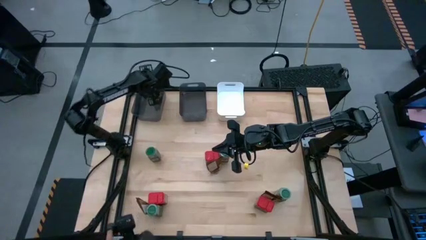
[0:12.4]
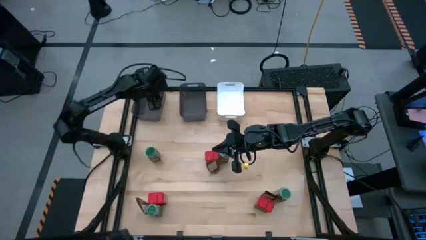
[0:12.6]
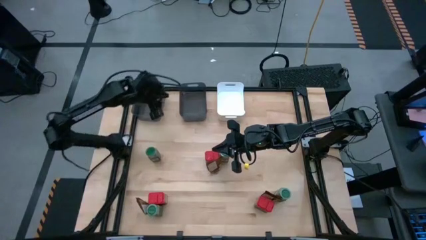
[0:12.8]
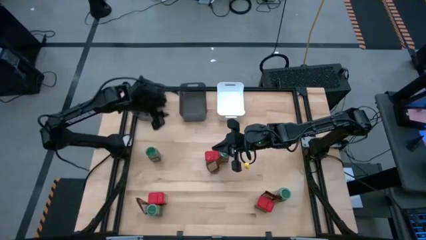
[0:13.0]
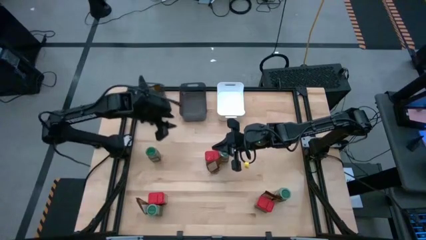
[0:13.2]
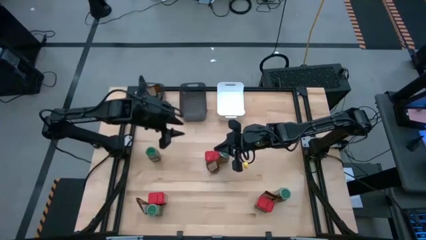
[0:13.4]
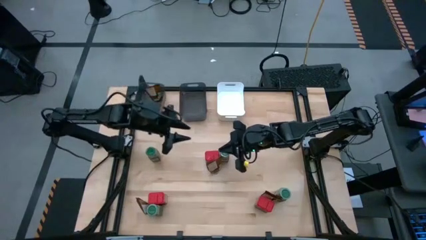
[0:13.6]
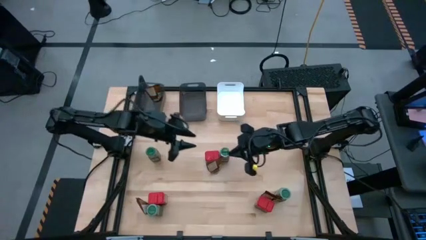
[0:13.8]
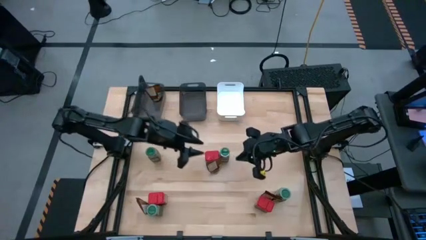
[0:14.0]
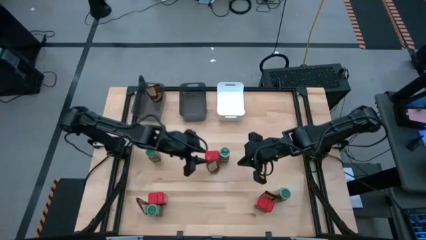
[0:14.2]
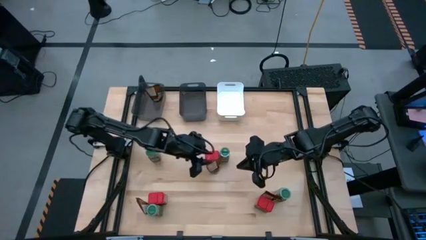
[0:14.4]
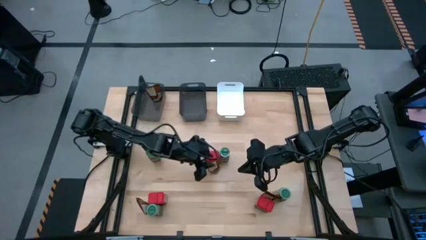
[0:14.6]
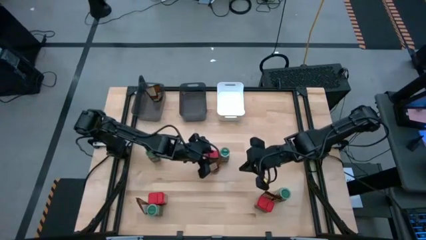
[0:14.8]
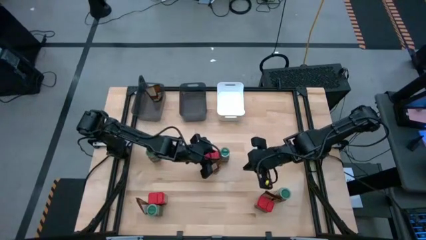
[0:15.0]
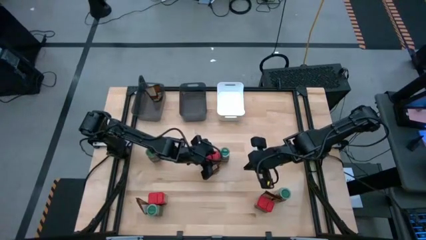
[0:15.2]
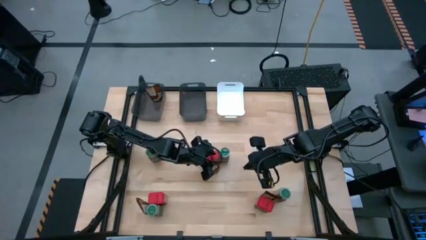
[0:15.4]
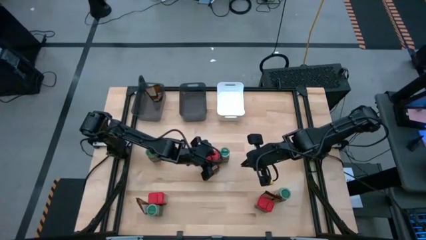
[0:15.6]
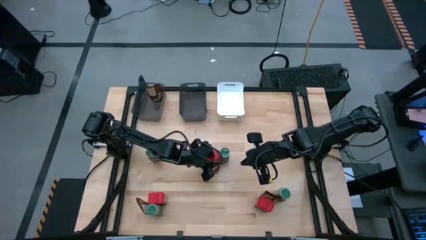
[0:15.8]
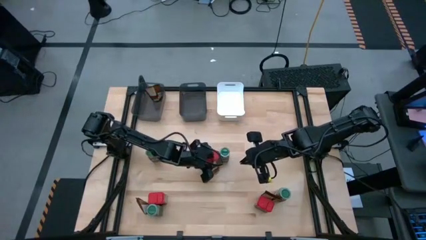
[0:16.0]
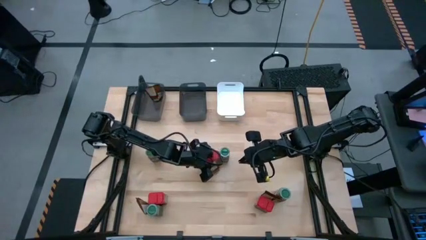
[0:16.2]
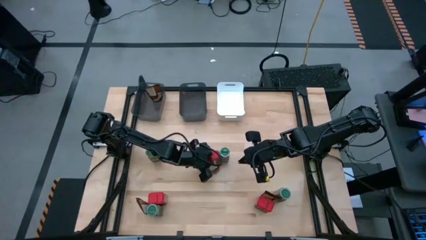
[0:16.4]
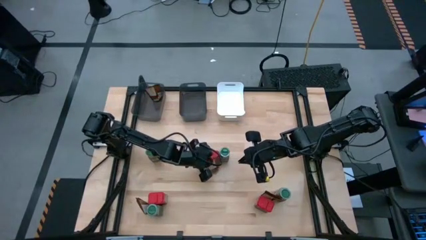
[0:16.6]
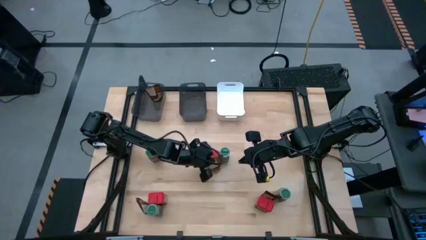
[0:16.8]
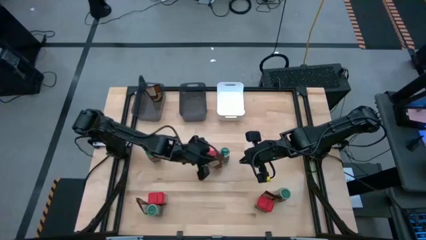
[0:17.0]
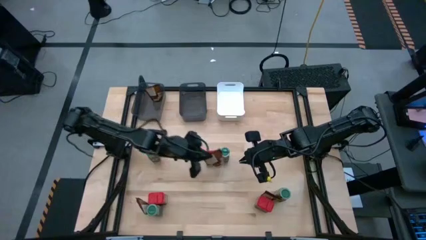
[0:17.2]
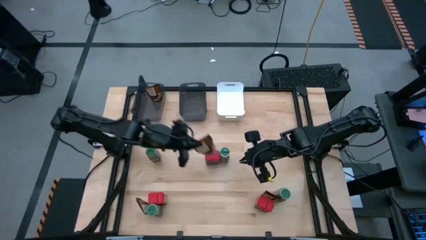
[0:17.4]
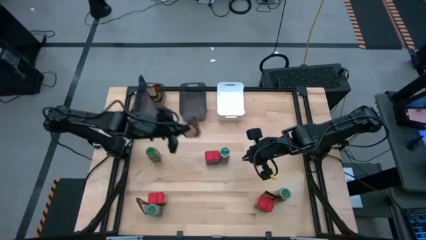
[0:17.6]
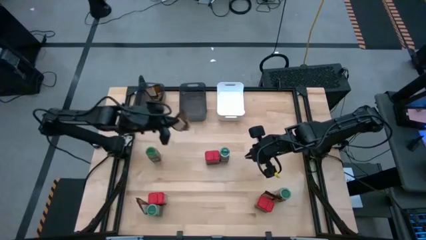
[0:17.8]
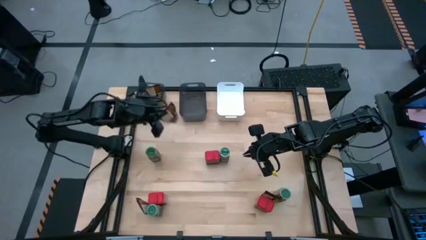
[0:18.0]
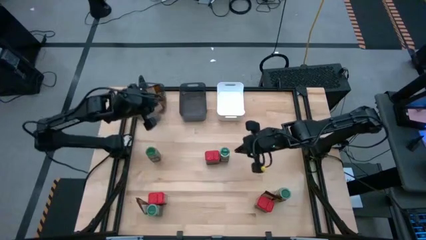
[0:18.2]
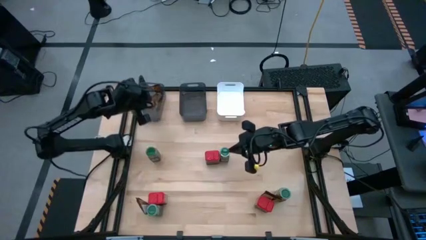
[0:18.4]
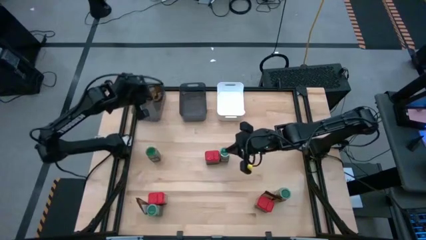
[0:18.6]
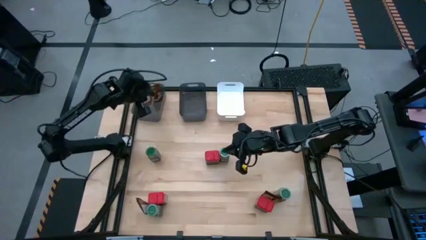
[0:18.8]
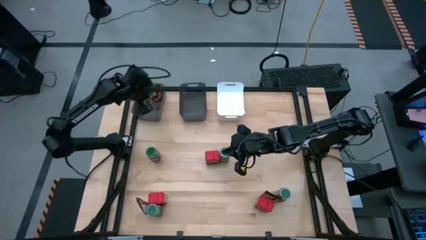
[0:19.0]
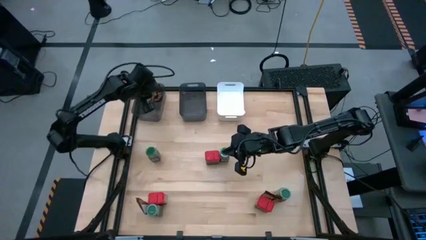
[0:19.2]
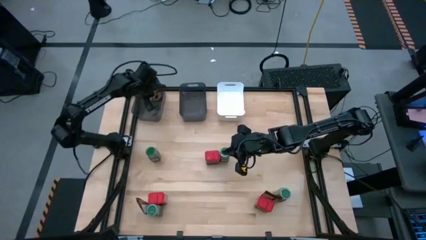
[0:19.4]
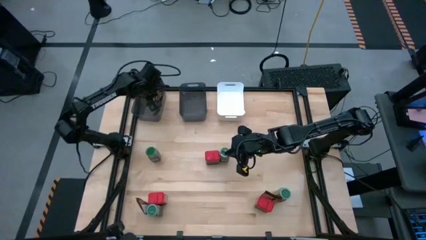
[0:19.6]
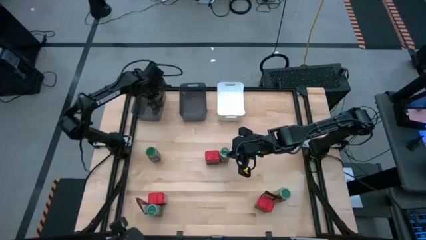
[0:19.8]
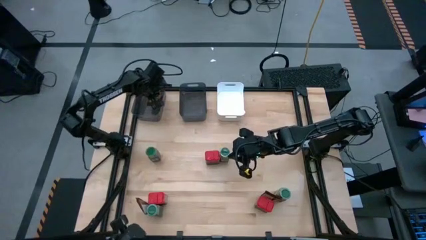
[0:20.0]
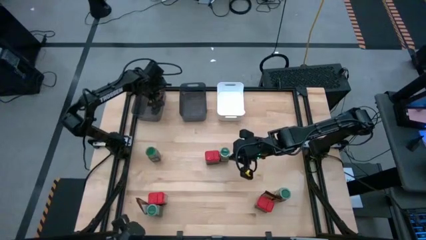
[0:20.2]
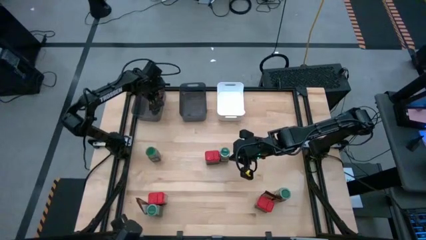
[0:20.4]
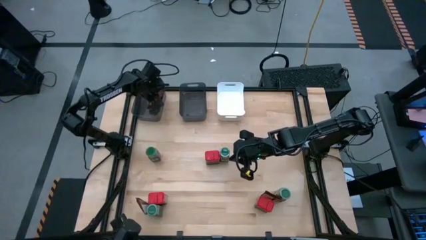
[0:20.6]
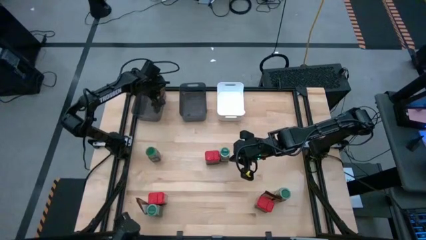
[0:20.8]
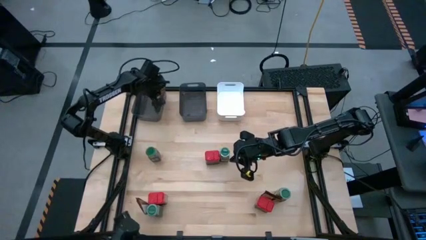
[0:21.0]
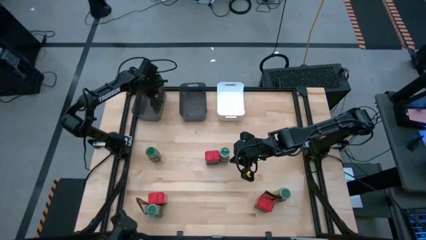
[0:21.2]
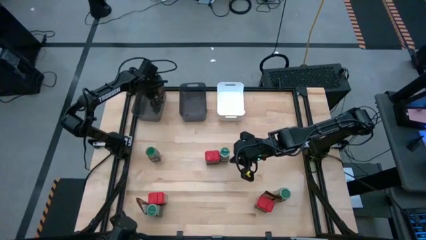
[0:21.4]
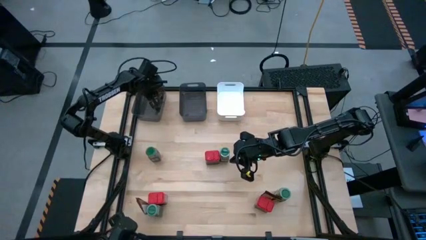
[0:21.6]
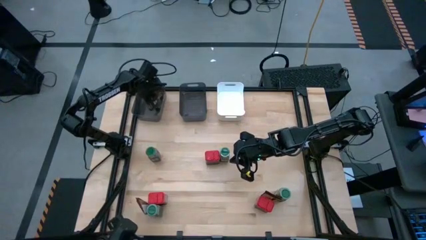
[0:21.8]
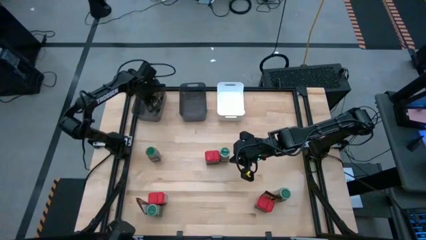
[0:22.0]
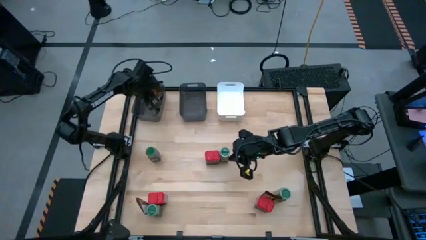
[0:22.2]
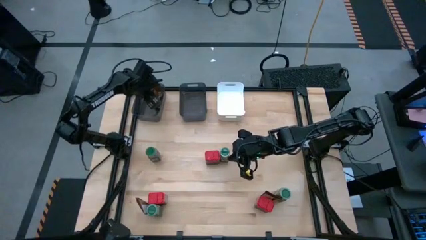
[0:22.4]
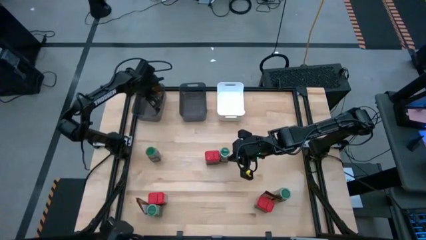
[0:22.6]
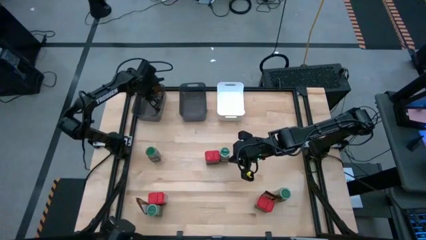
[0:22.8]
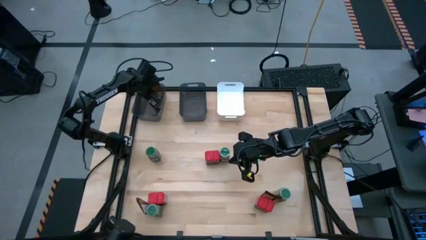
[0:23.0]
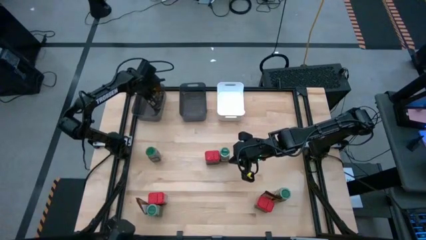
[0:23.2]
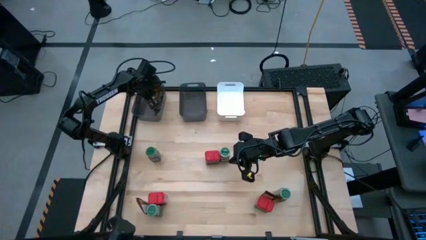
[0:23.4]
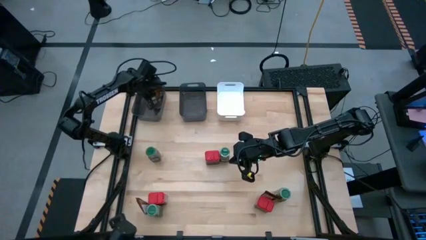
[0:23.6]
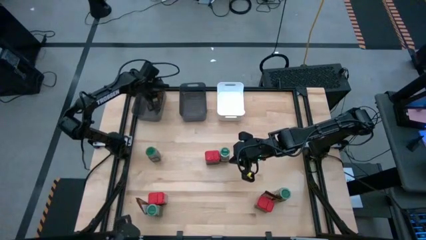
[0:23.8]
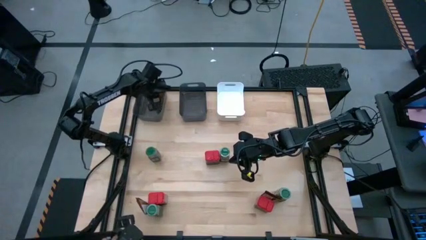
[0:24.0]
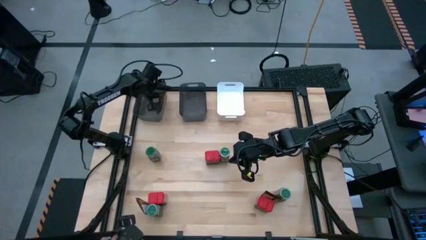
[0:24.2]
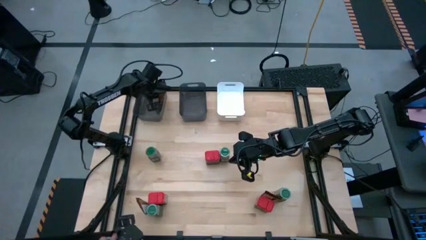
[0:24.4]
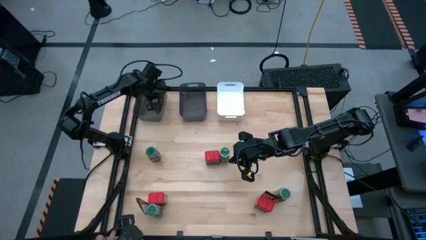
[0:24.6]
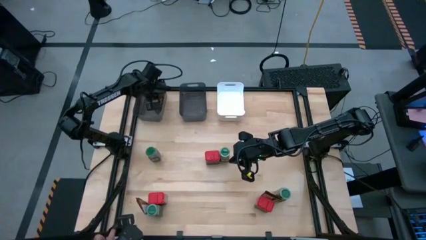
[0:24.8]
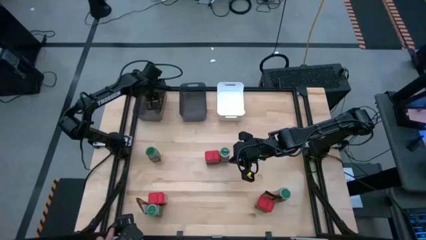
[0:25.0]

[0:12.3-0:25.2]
Task: Sort spices by type
Put the middle top brown seasoning sachet into the left black bin
